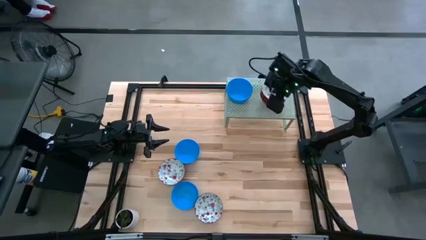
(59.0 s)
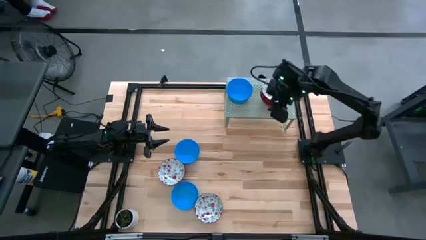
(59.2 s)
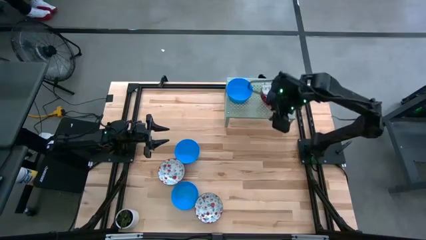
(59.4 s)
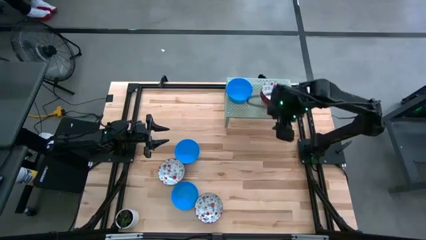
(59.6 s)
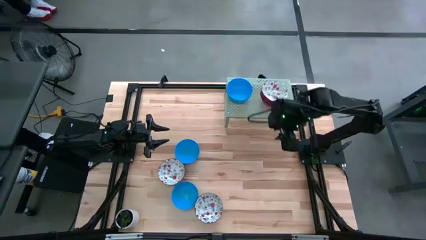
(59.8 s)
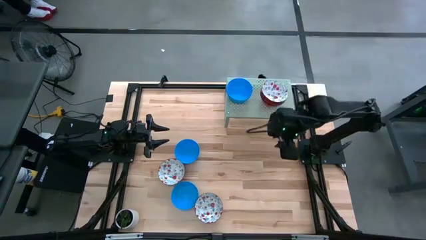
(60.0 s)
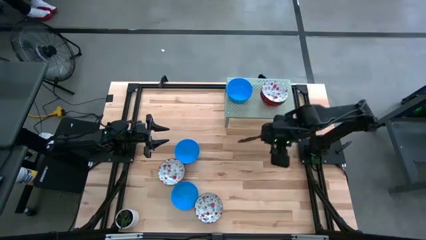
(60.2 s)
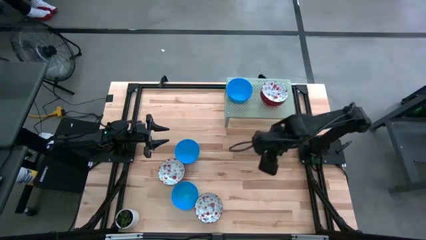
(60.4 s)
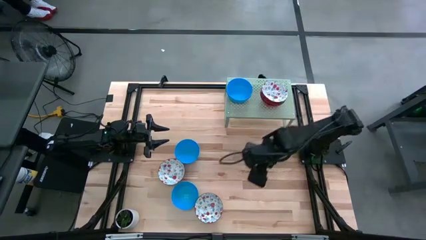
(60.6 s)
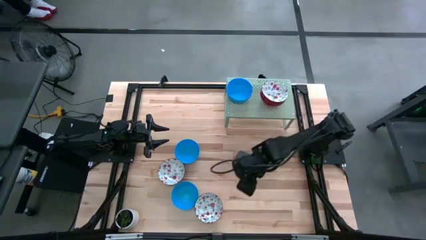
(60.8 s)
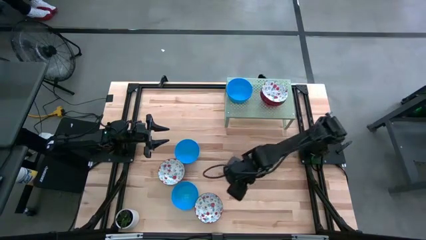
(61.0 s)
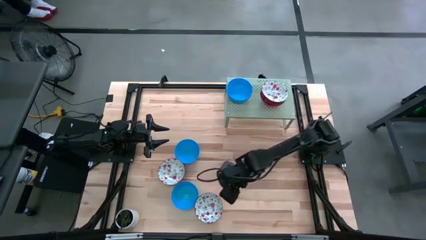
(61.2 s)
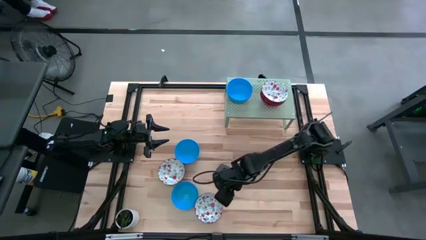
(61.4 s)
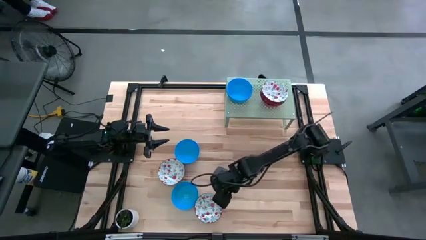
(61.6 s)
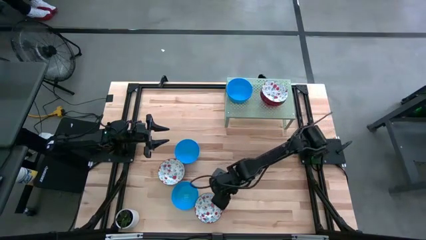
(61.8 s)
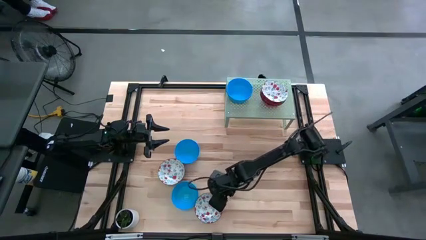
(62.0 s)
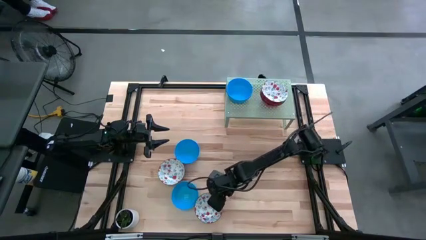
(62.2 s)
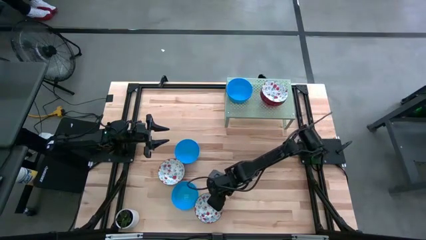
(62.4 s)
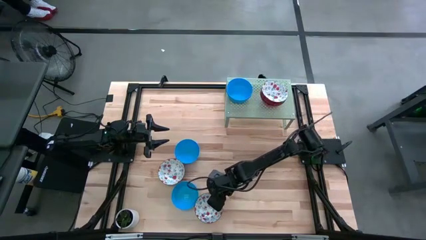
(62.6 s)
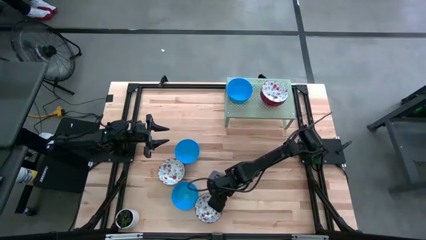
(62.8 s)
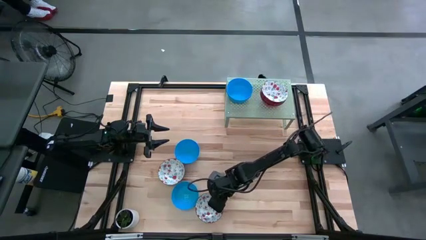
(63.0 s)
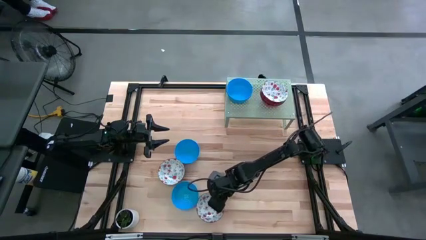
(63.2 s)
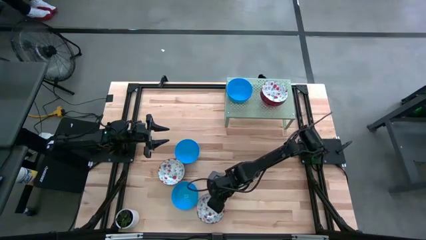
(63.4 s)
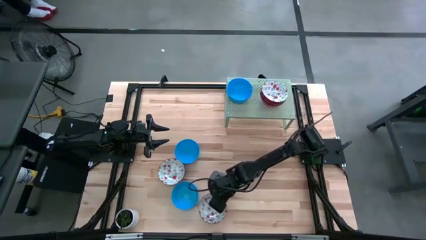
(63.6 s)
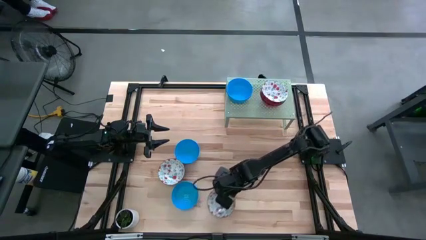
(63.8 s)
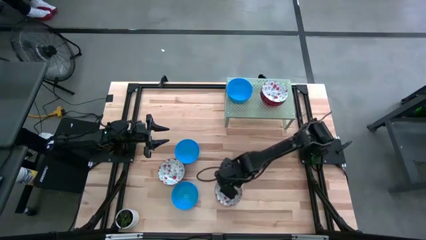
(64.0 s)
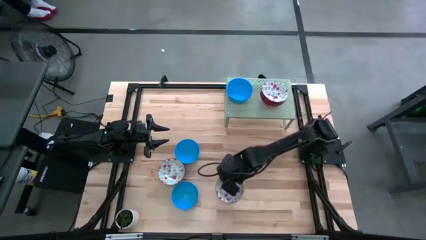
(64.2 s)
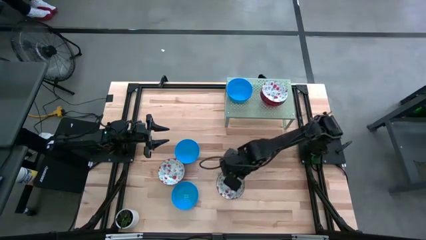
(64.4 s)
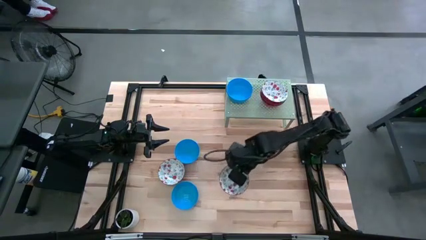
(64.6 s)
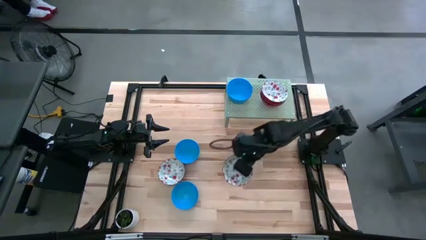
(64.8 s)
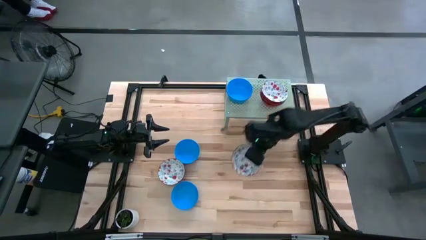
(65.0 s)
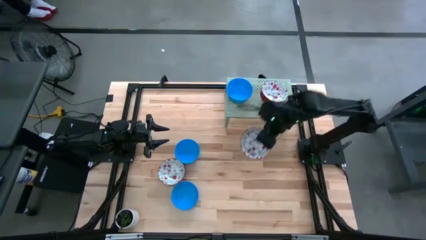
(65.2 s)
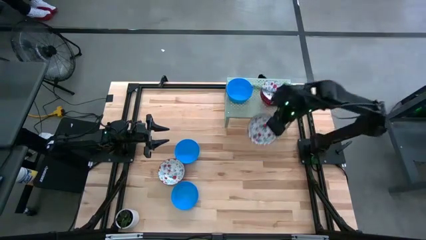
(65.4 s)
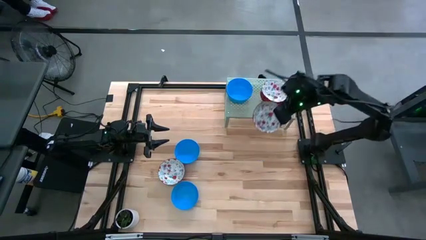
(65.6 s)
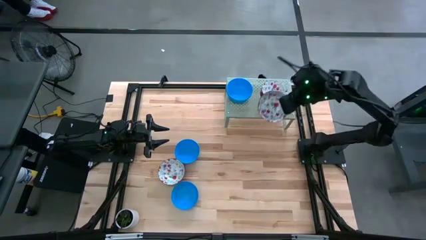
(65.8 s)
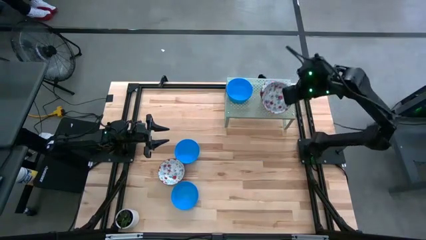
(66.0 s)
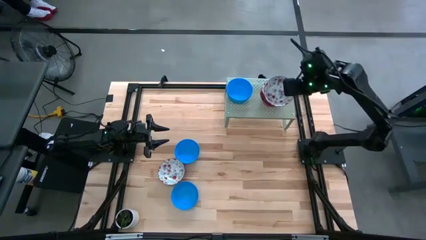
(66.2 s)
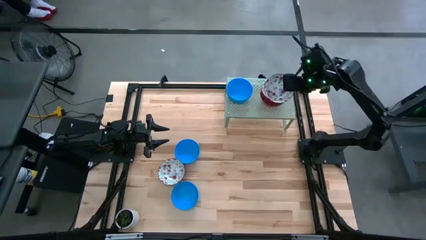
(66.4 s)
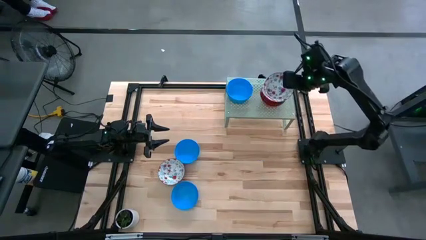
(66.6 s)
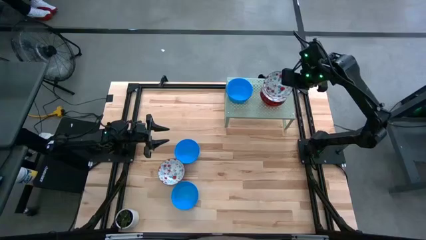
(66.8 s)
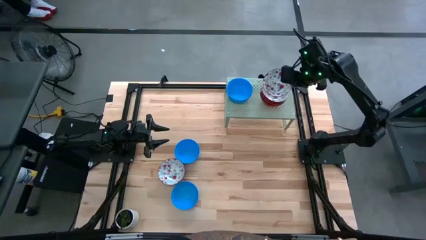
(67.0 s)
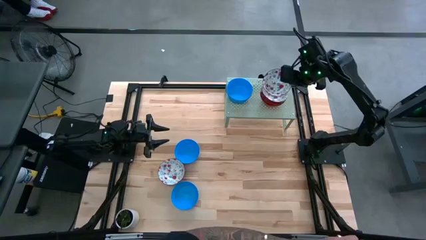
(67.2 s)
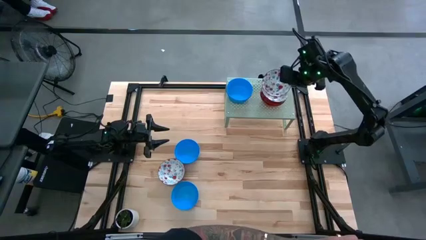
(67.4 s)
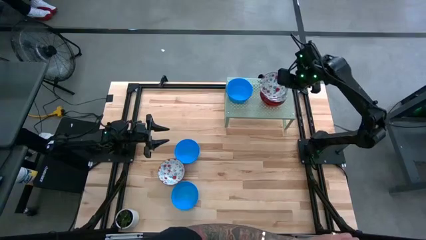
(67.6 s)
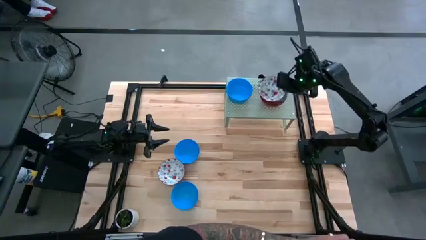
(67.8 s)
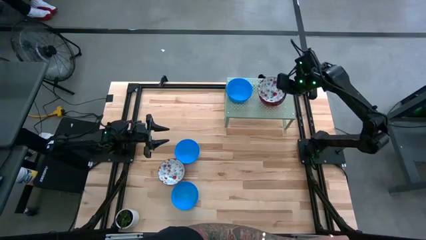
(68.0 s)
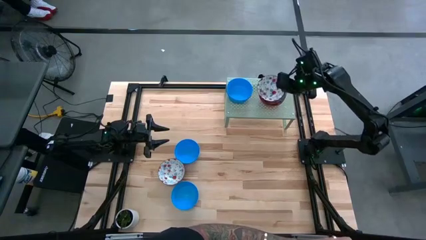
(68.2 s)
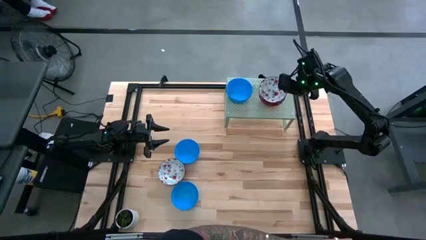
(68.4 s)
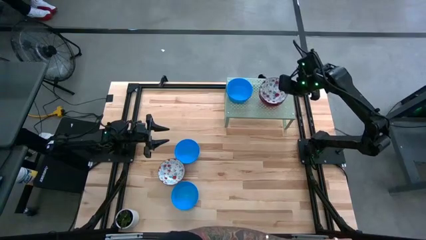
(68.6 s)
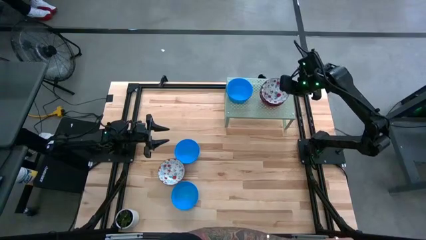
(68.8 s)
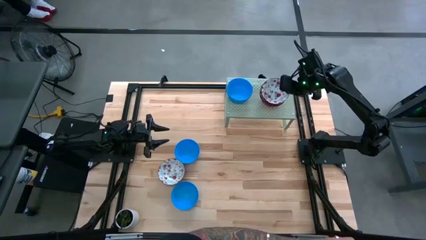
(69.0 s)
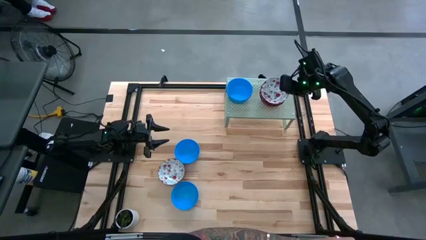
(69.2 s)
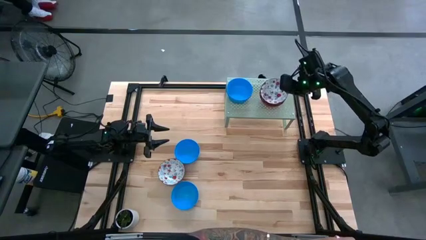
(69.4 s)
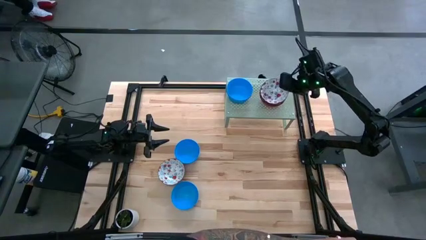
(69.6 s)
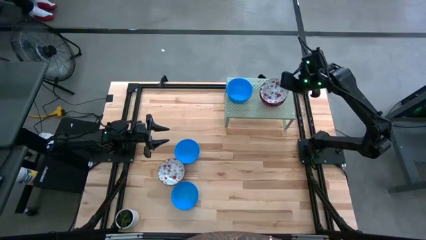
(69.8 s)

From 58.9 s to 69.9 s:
Task: Pick & Place Mini bowls
Stack the white bowl on the white bowls on the shelf
